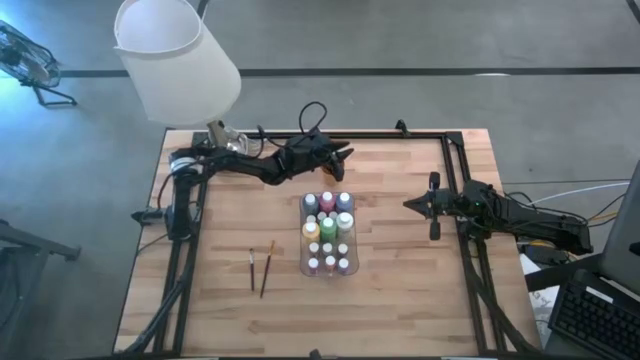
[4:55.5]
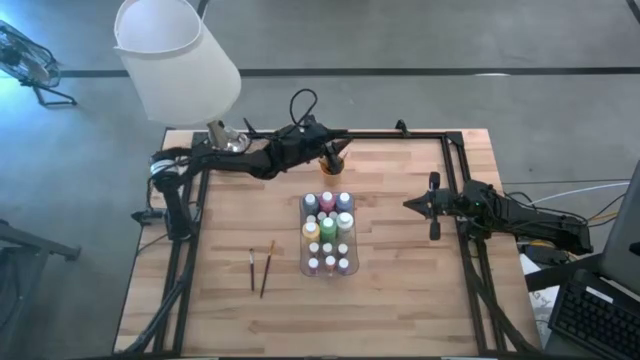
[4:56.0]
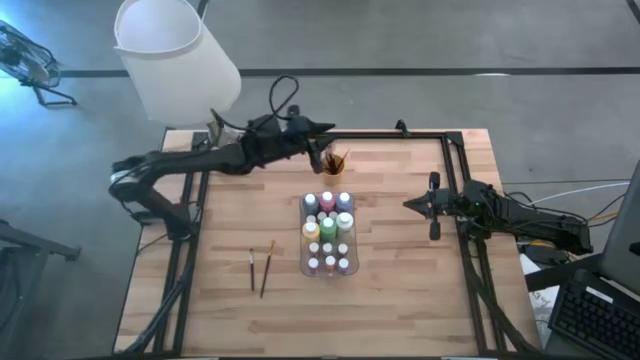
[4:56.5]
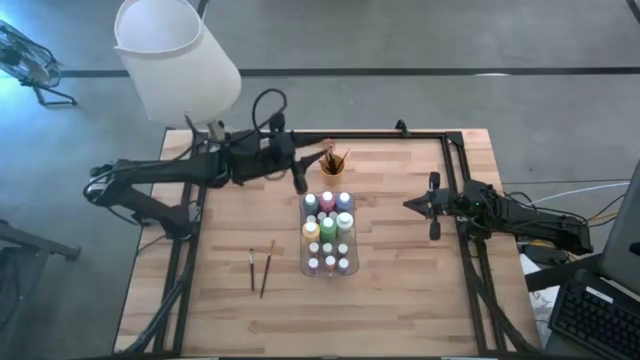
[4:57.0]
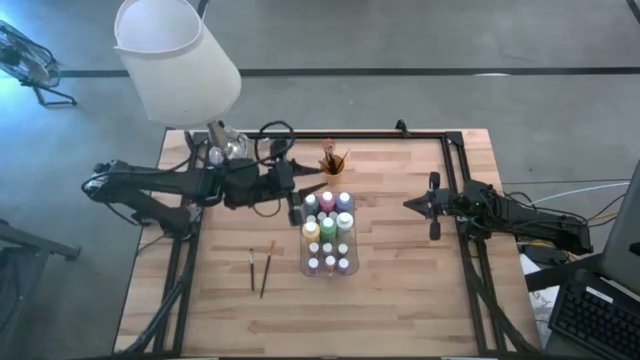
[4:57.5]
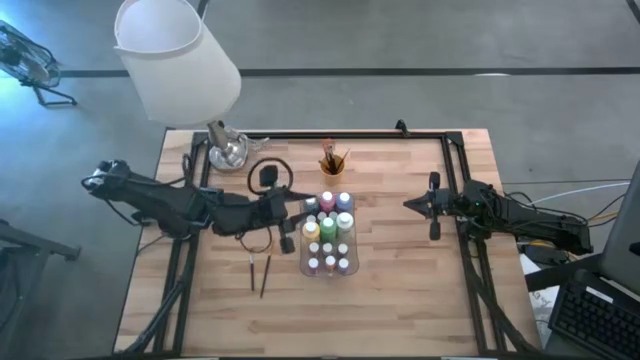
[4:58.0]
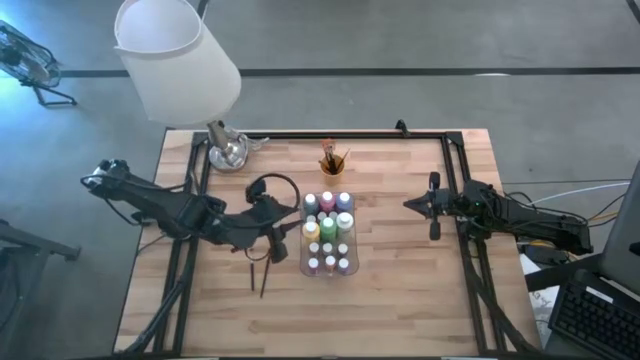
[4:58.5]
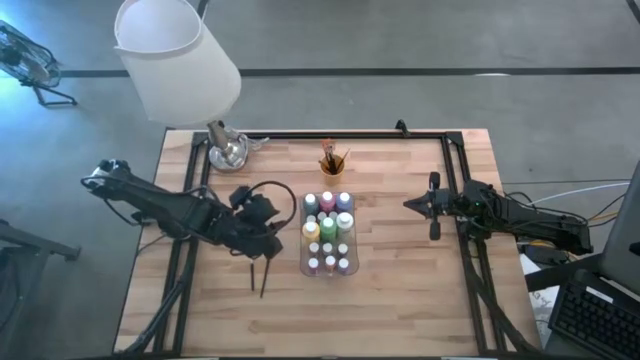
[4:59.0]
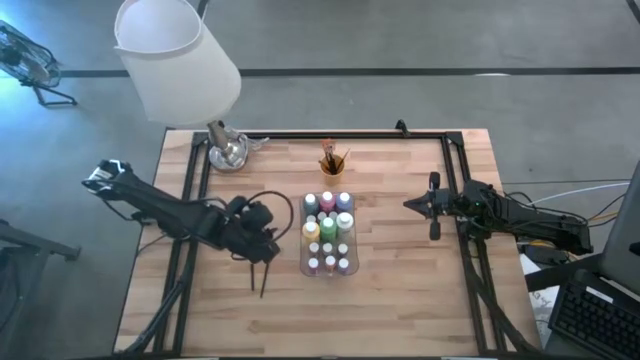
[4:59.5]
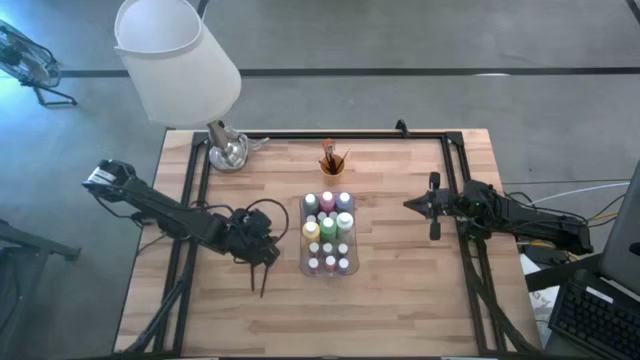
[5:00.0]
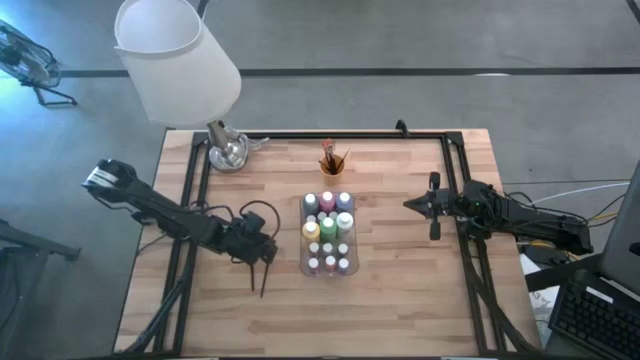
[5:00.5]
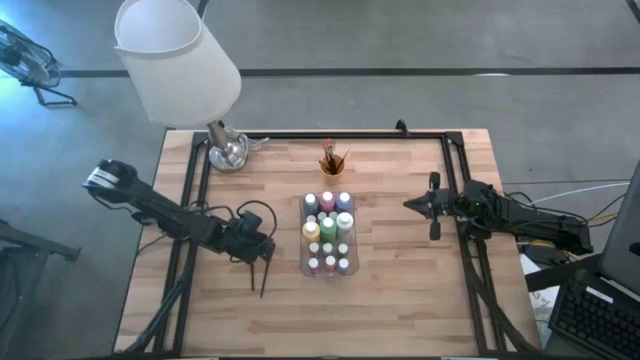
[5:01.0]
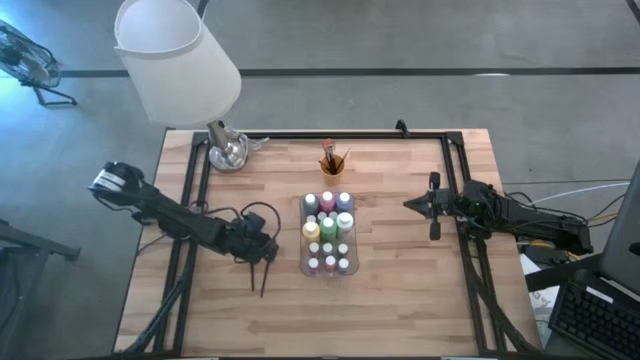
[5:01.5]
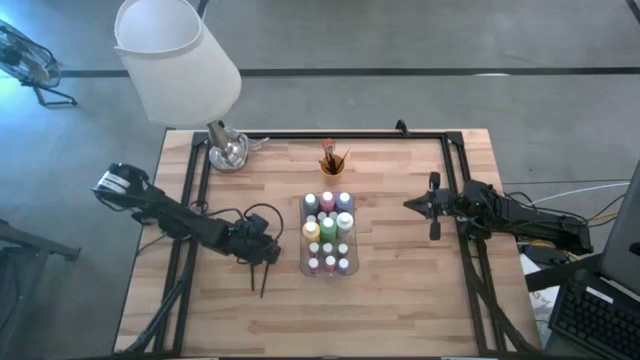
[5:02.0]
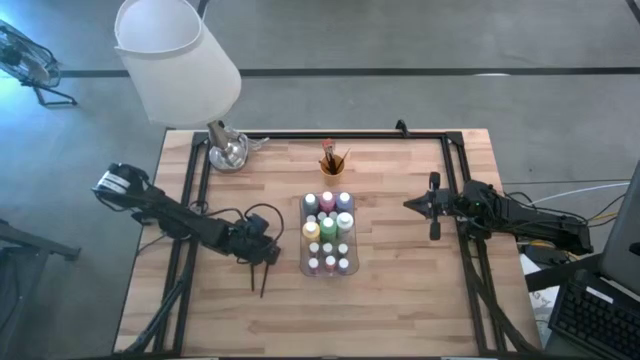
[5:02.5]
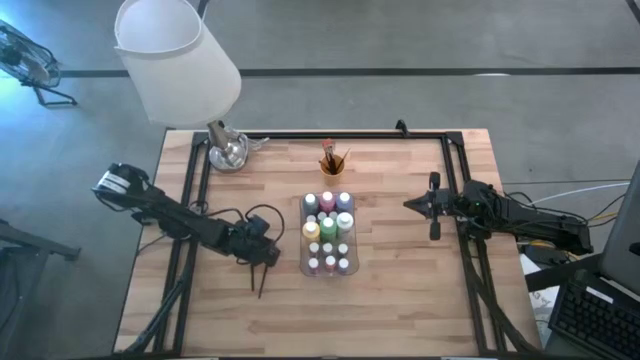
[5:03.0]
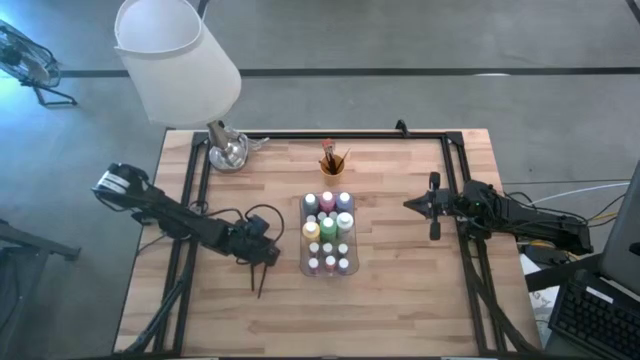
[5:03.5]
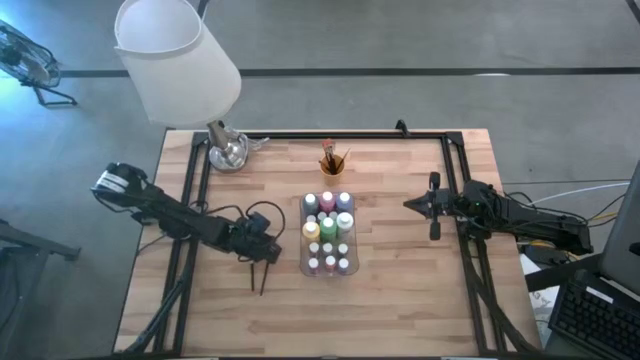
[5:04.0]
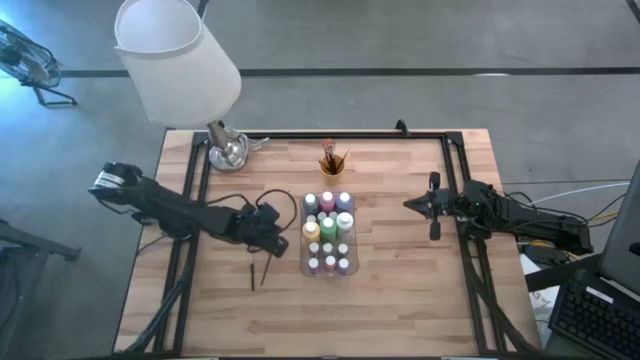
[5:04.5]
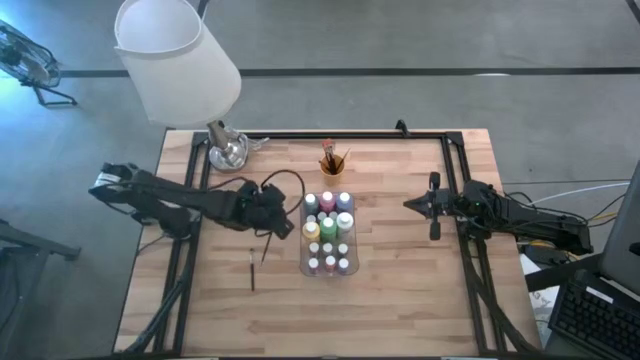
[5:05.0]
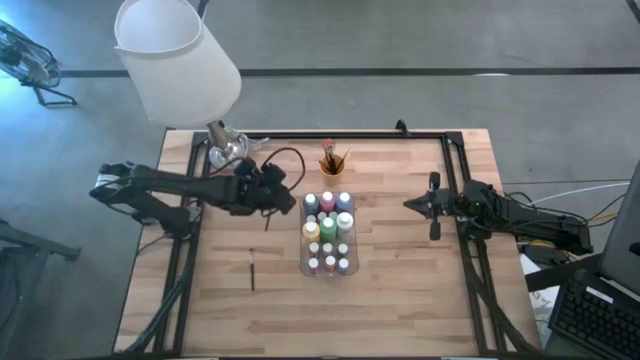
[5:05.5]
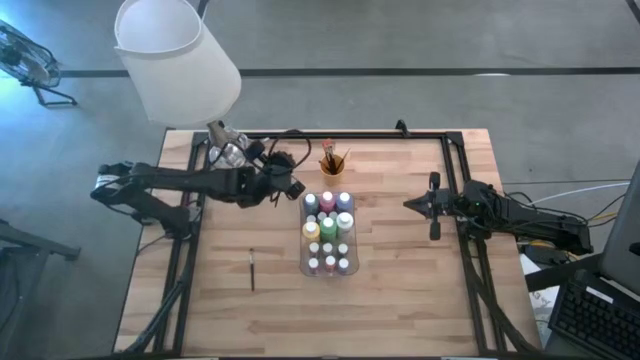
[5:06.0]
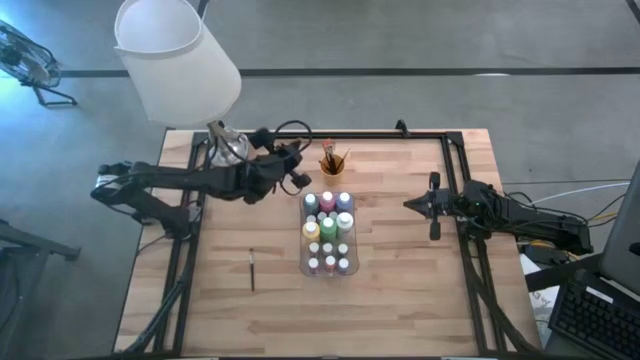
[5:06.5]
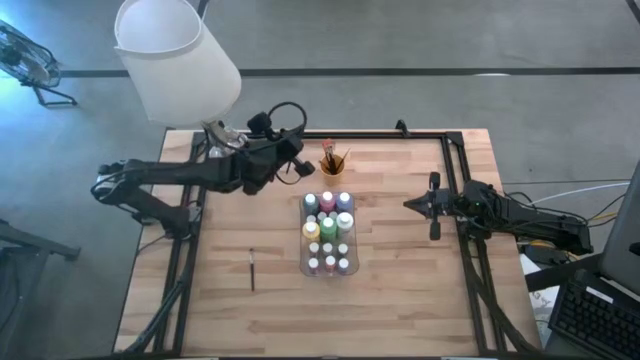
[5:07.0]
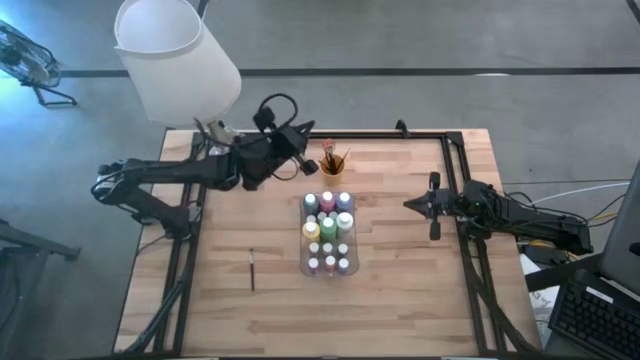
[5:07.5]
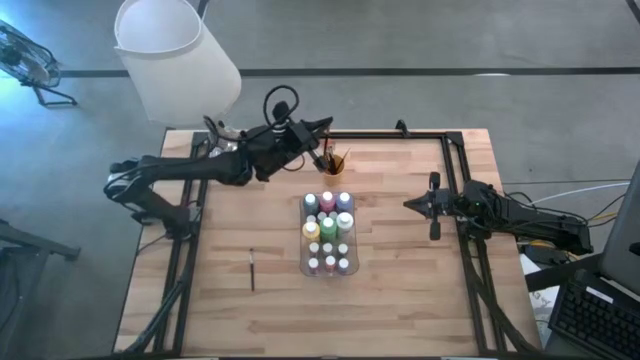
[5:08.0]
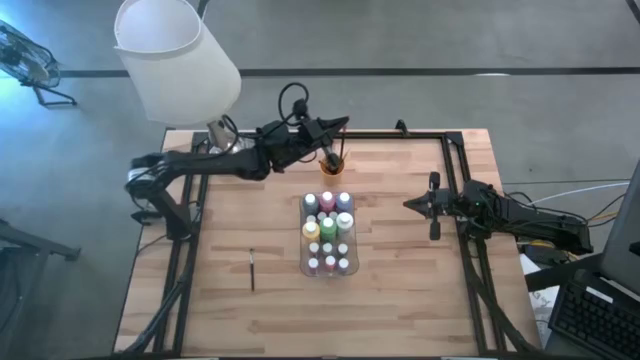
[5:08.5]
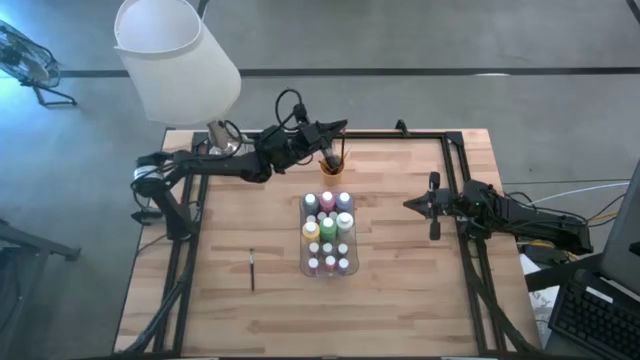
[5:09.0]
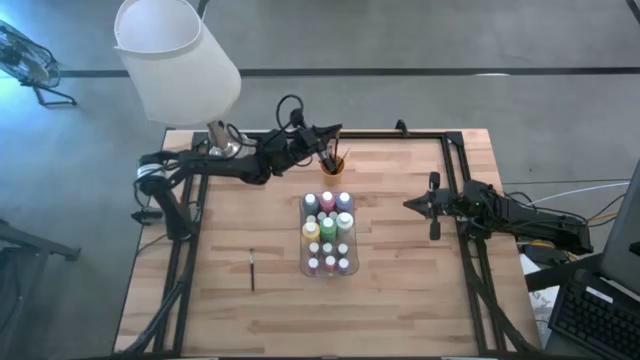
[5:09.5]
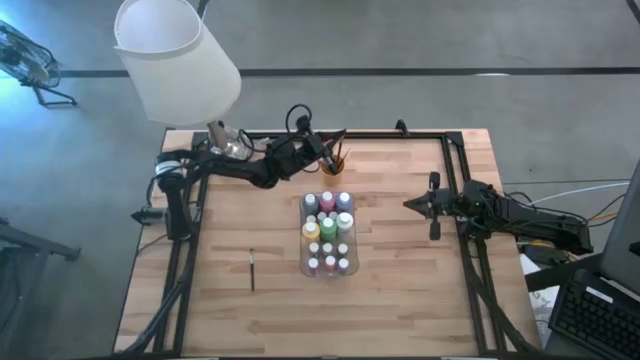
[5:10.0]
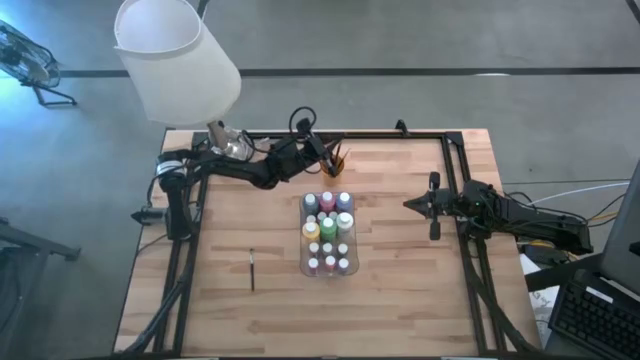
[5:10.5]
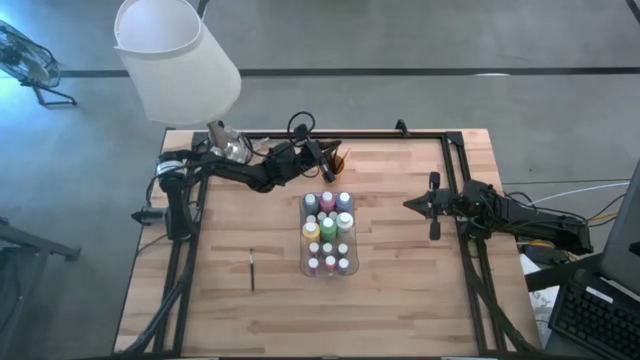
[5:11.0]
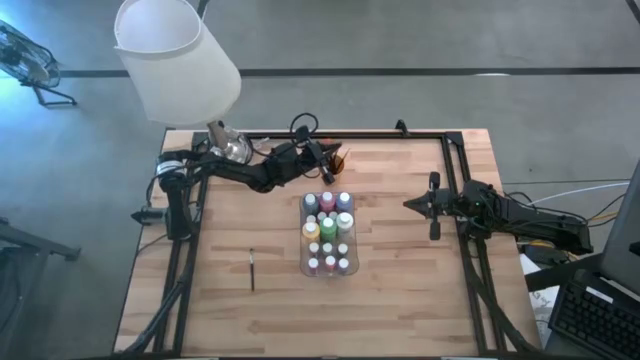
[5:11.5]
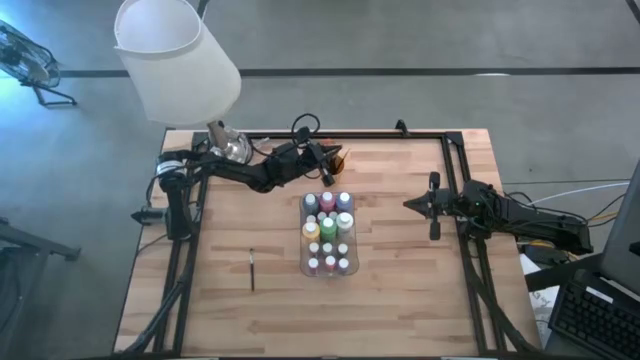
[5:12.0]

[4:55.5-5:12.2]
Task: Pick & Place Paint Supplies
Put the yellow paintbrush into the yellow cup

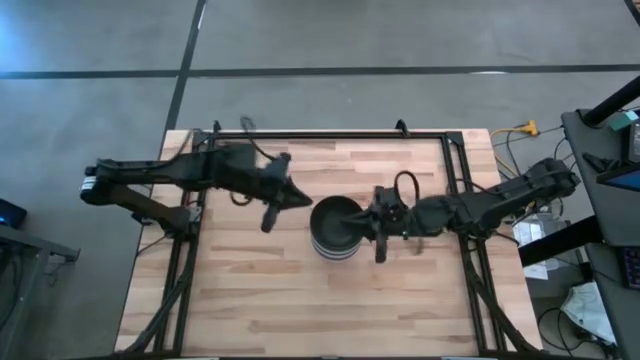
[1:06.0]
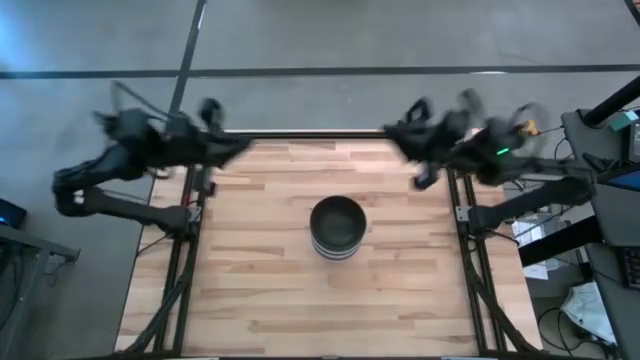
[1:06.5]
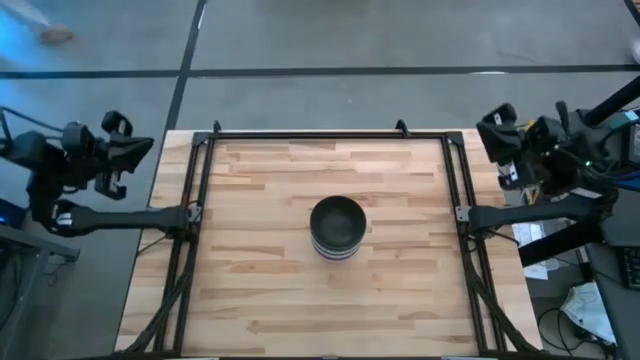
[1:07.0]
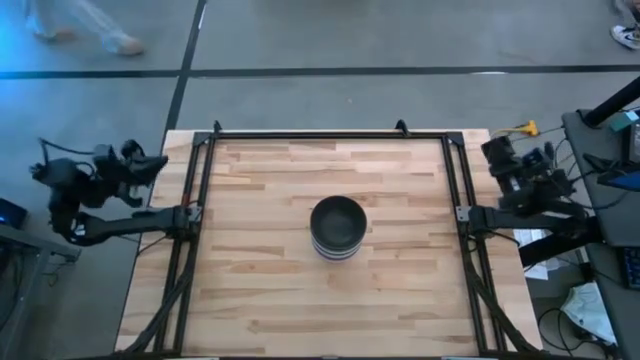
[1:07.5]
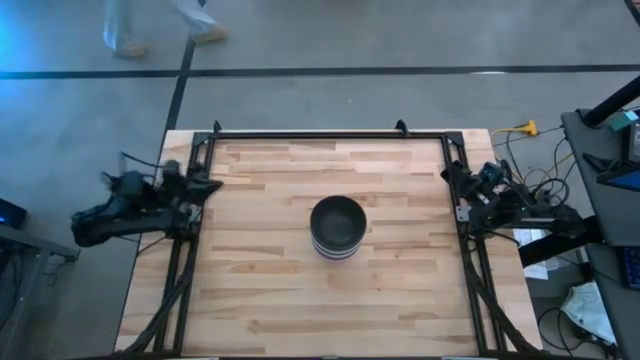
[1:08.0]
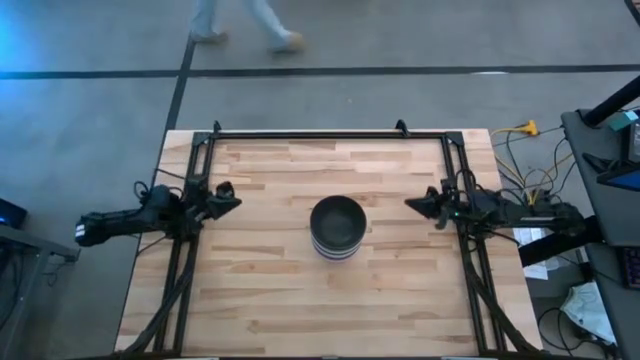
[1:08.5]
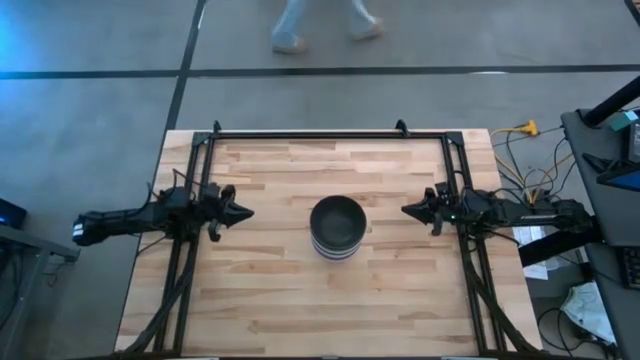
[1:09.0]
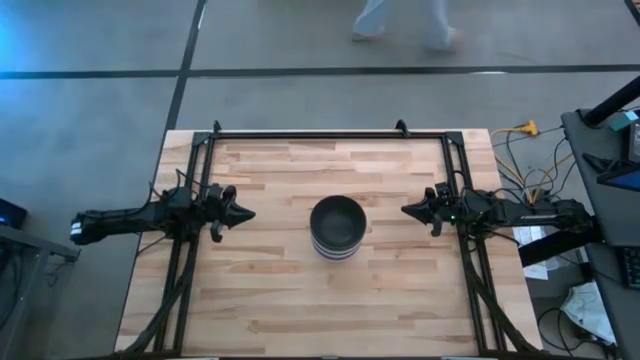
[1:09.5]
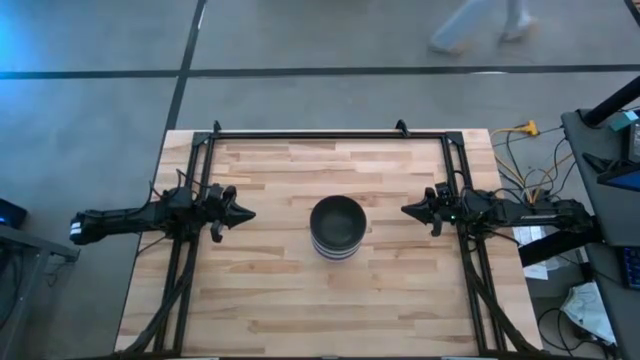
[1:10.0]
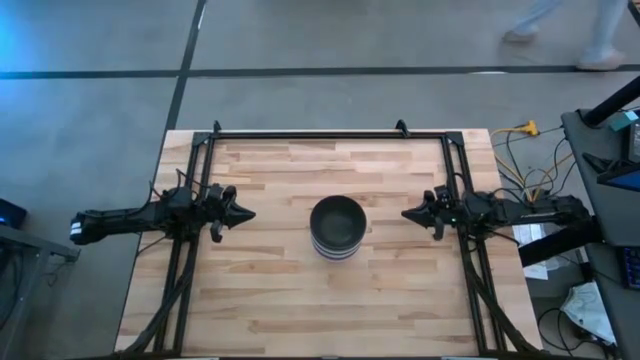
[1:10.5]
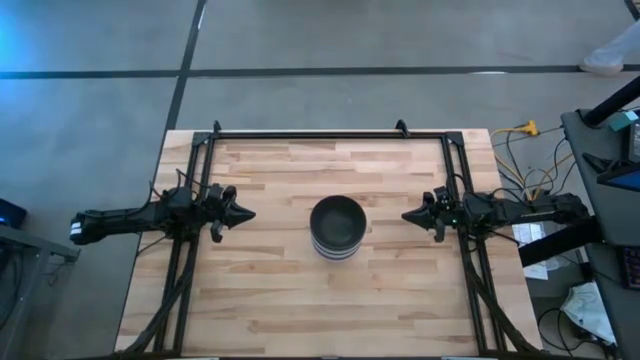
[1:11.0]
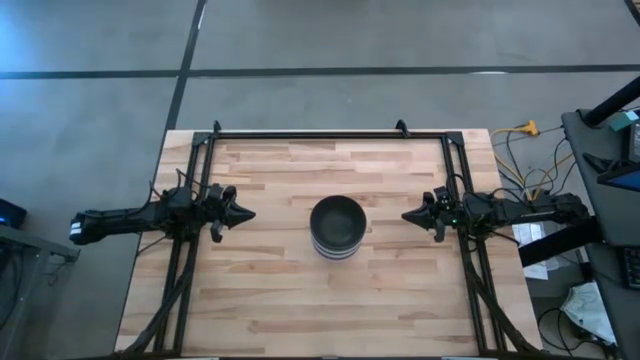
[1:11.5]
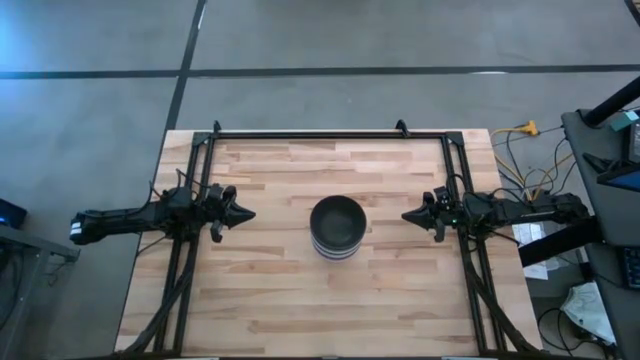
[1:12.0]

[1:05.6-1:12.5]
Task: Nest bowls inside each other
Return to Home Position
